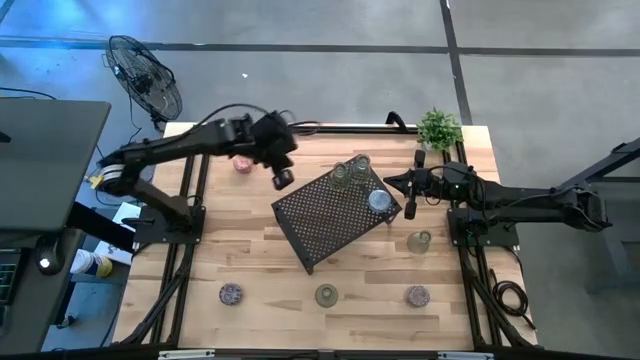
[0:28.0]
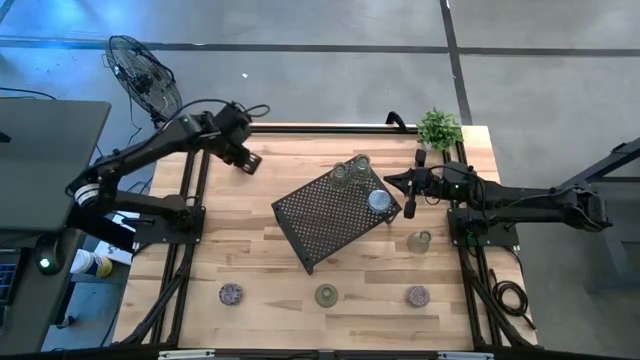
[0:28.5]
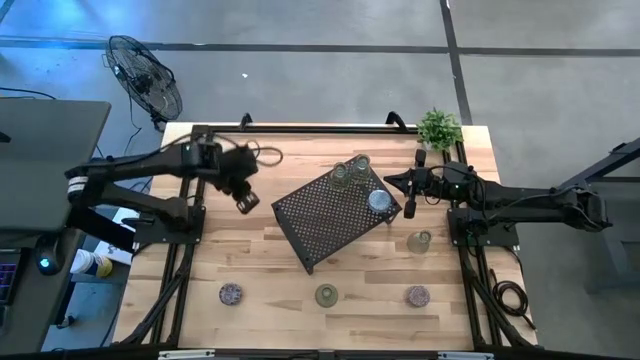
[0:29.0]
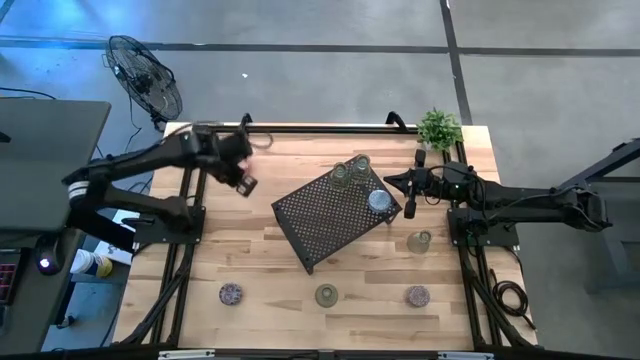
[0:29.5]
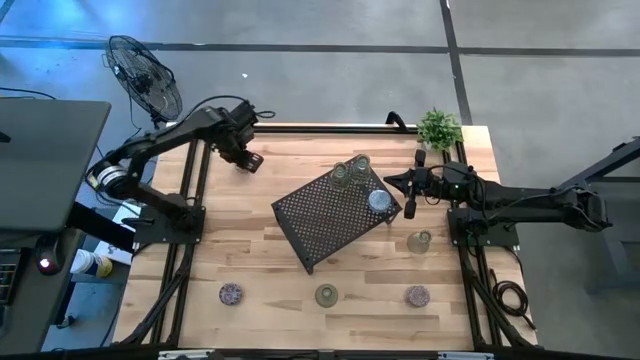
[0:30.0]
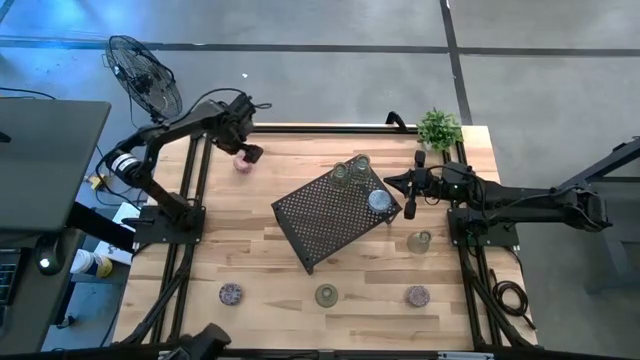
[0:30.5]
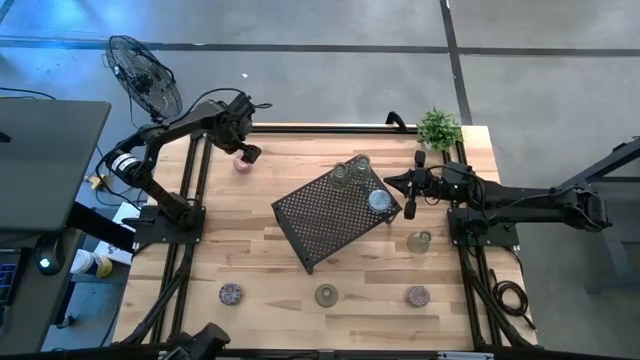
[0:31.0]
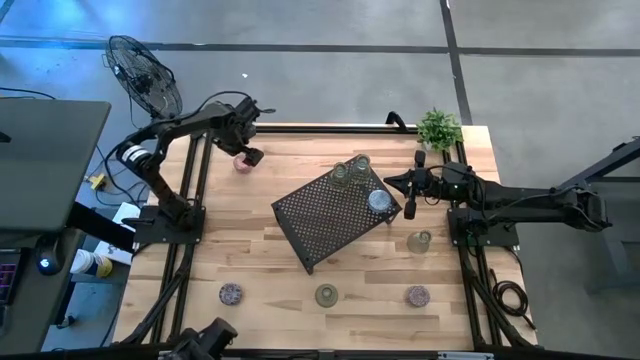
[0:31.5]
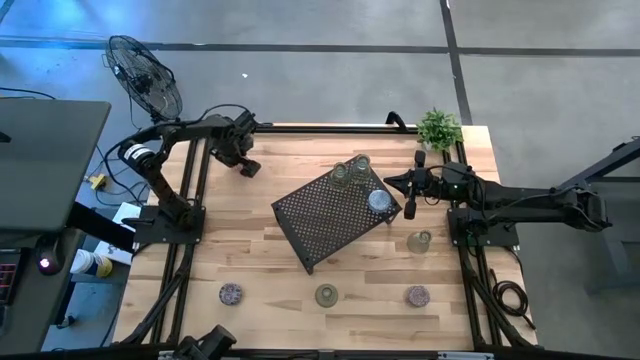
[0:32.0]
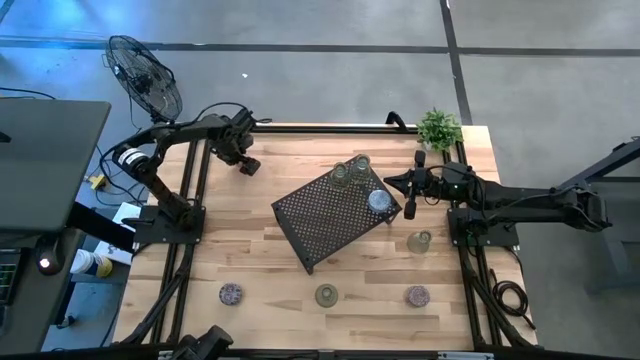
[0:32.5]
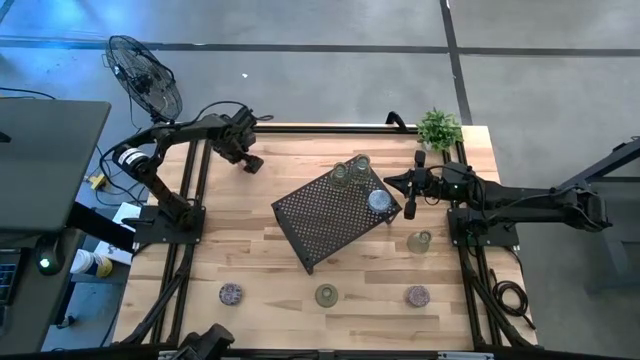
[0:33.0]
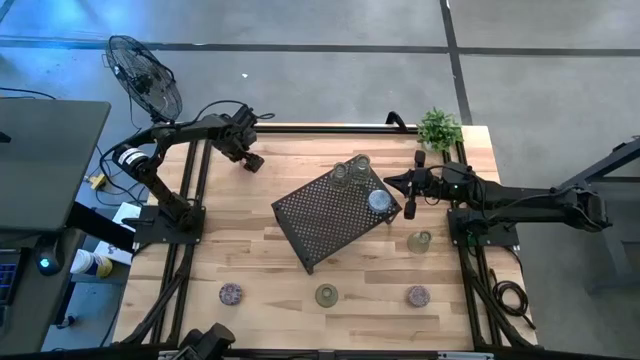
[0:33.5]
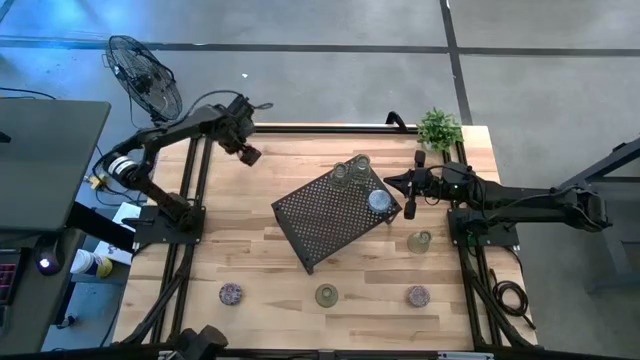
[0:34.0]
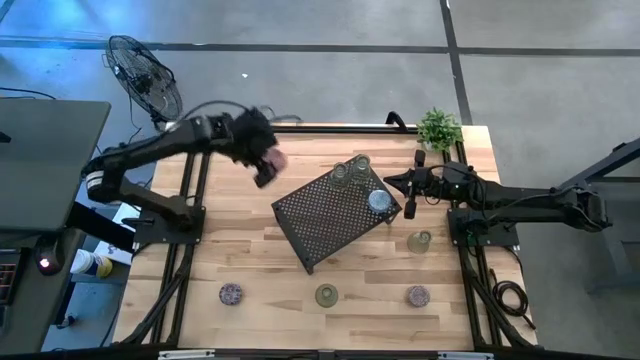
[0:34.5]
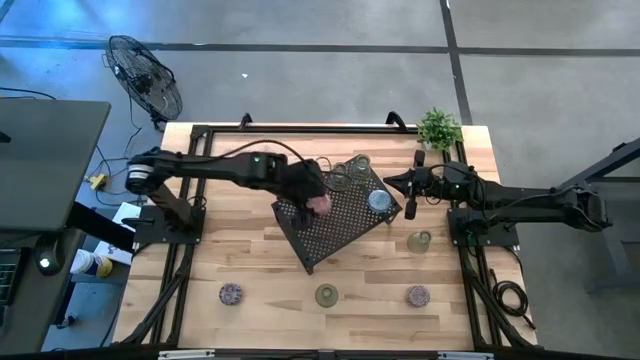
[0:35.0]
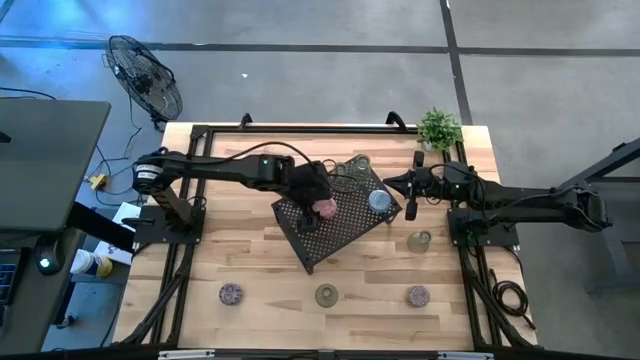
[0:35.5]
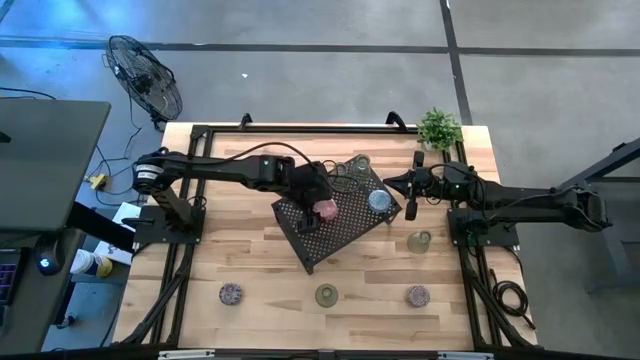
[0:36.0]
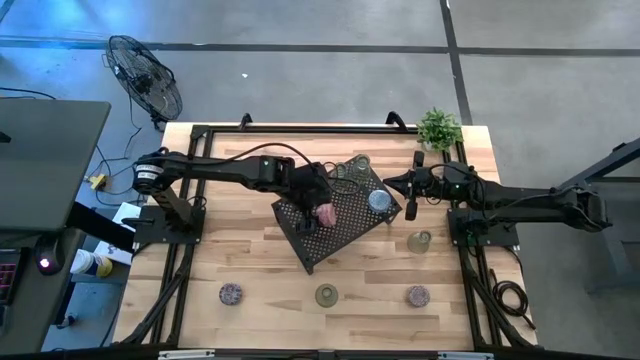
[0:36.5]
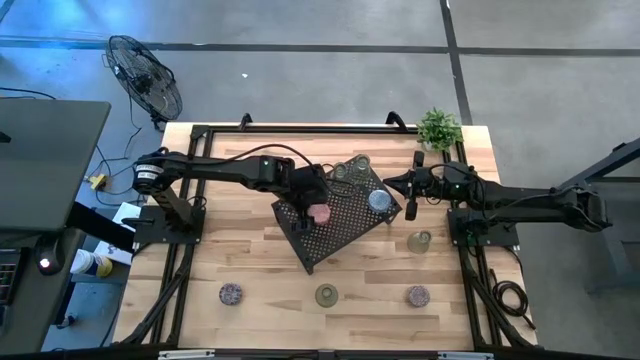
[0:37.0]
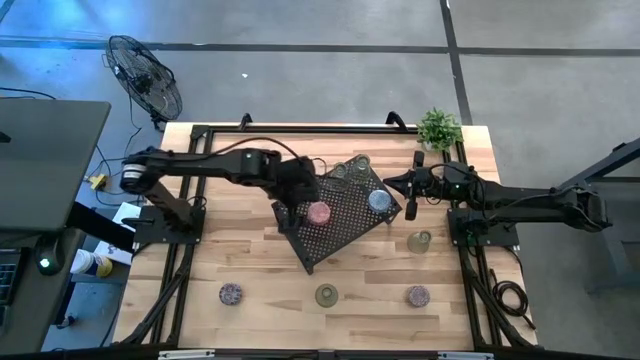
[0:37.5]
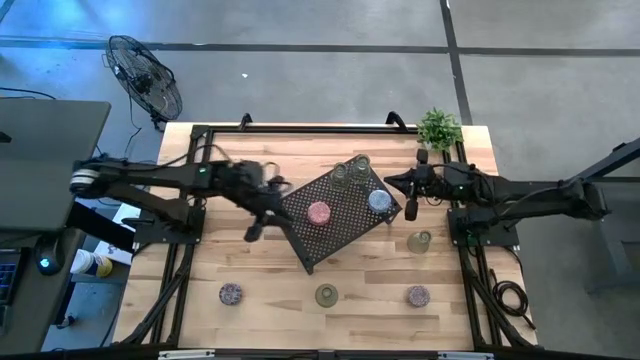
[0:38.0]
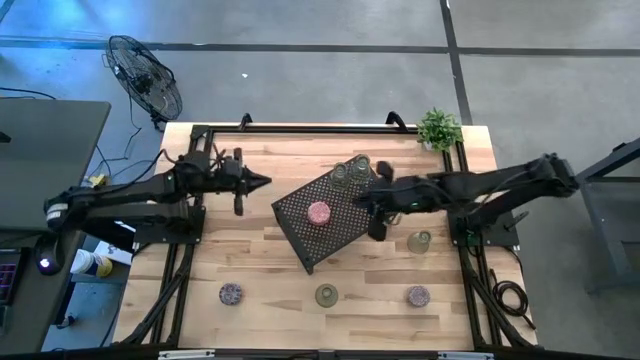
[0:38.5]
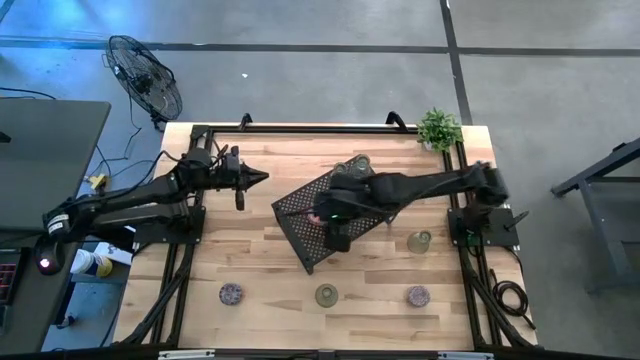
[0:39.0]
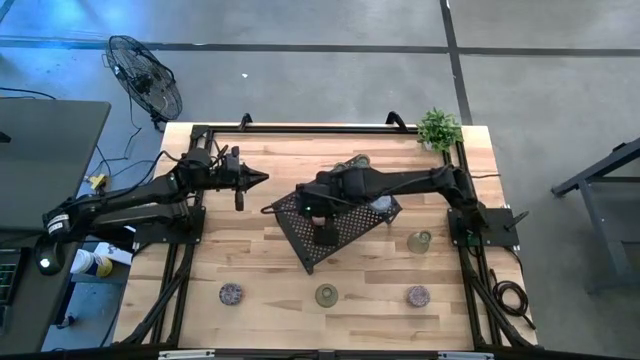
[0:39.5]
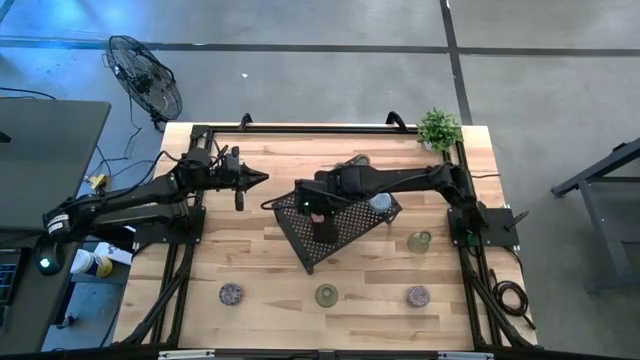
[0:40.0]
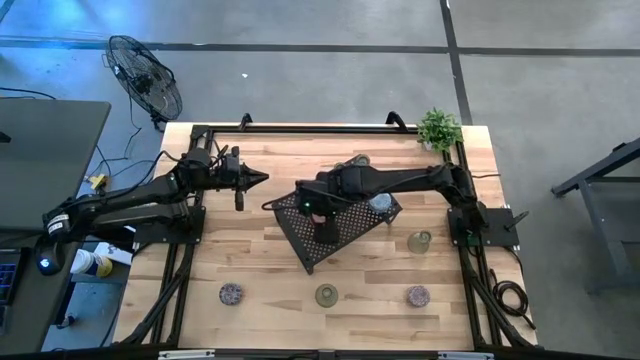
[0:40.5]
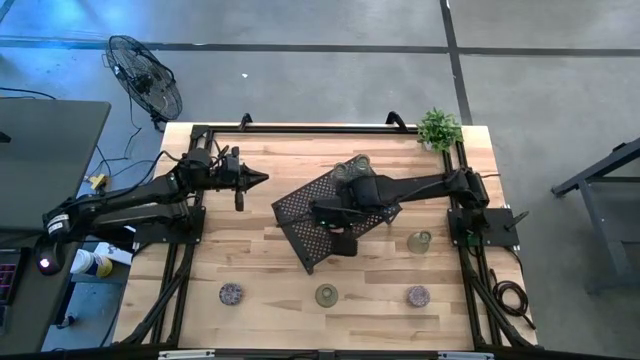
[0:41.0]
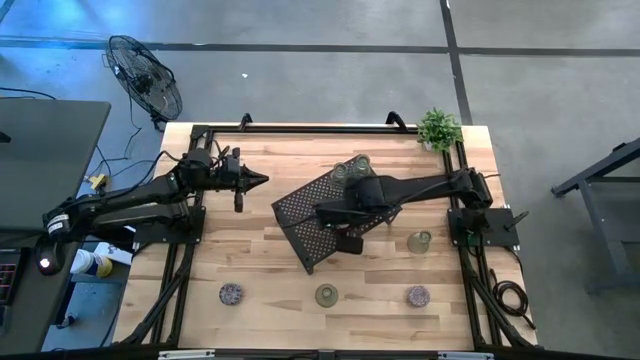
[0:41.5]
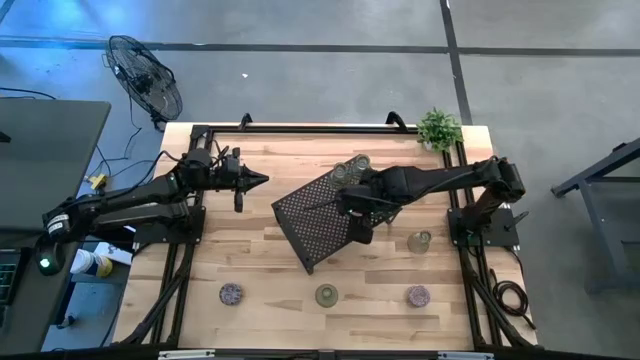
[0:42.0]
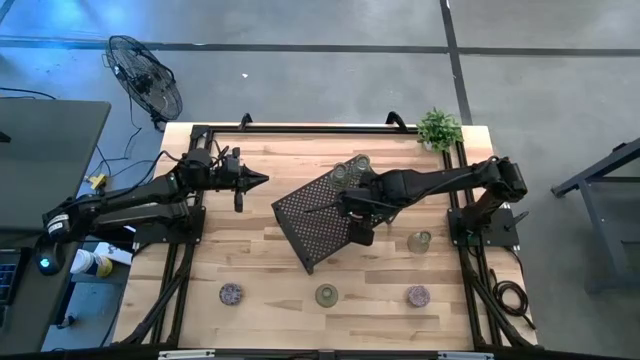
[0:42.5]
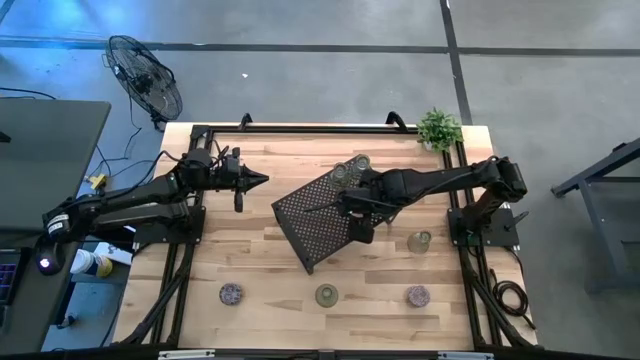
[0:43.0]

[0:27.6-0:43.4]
Task: Pick & Place candle stick holders
Put the pink scented candle on the shelf

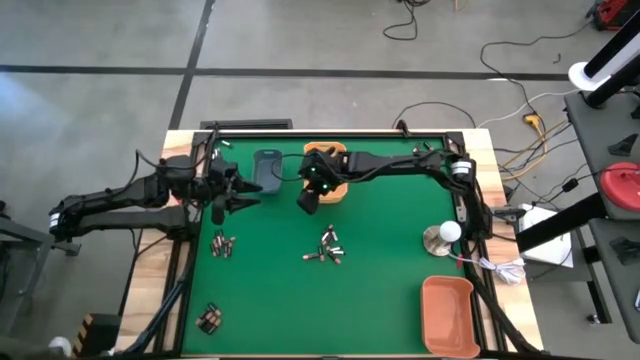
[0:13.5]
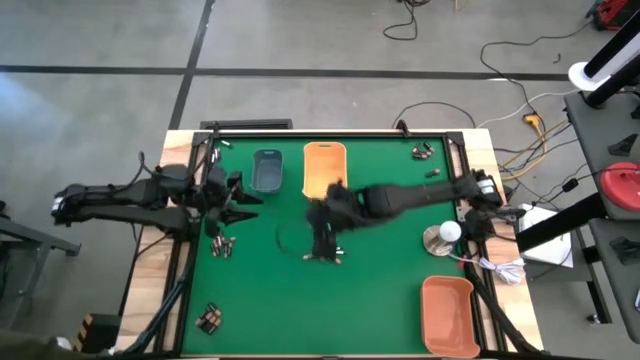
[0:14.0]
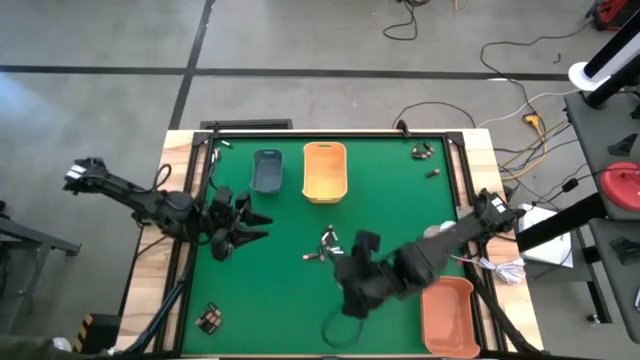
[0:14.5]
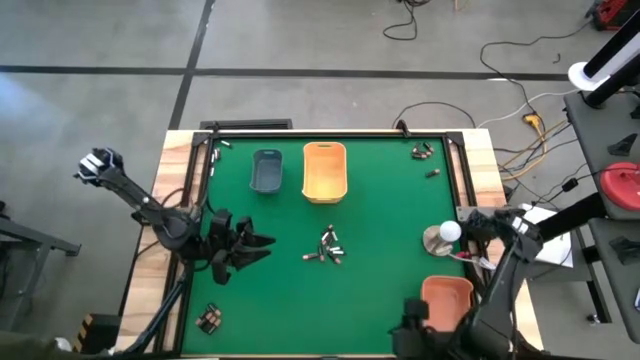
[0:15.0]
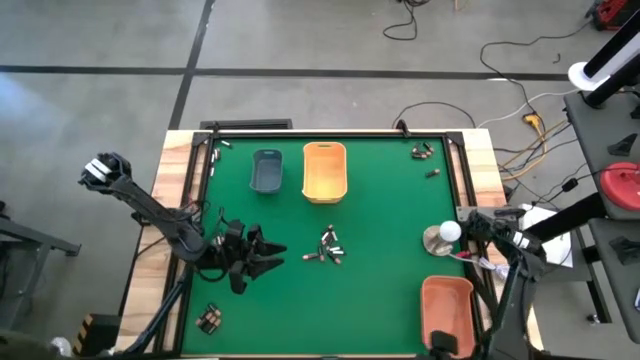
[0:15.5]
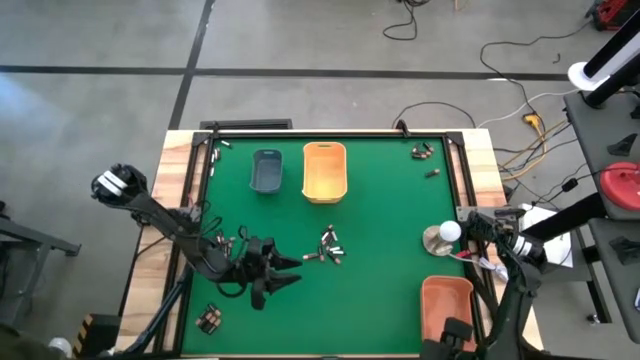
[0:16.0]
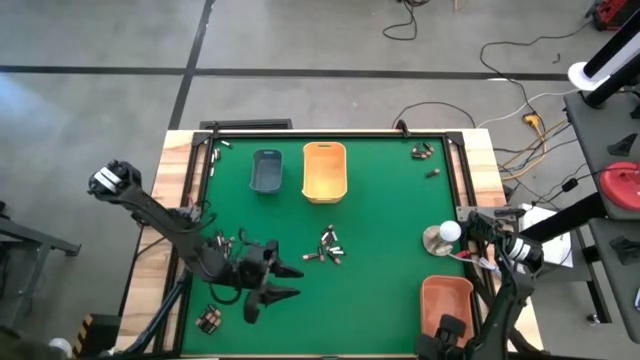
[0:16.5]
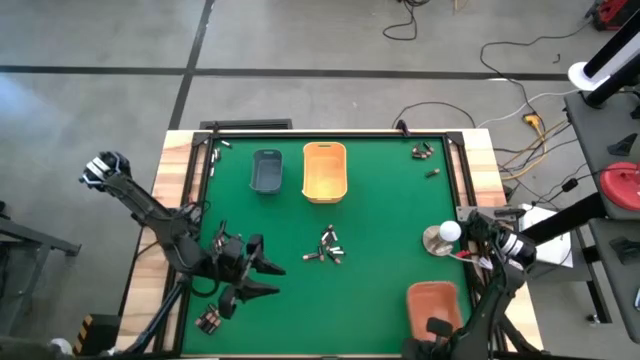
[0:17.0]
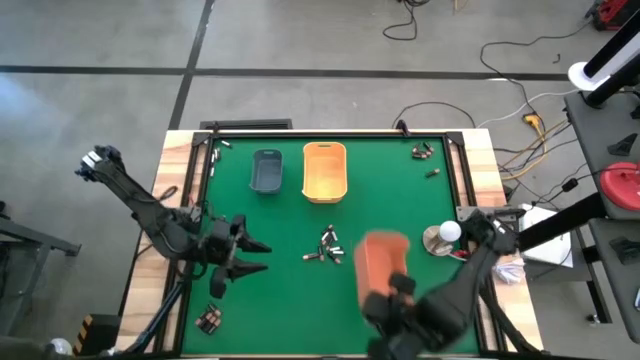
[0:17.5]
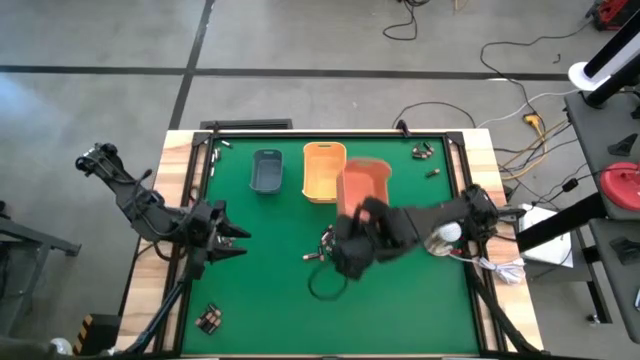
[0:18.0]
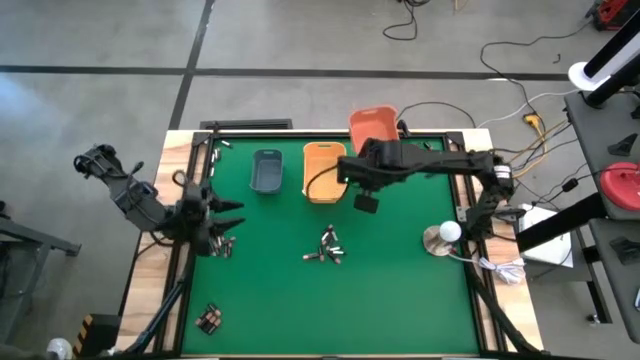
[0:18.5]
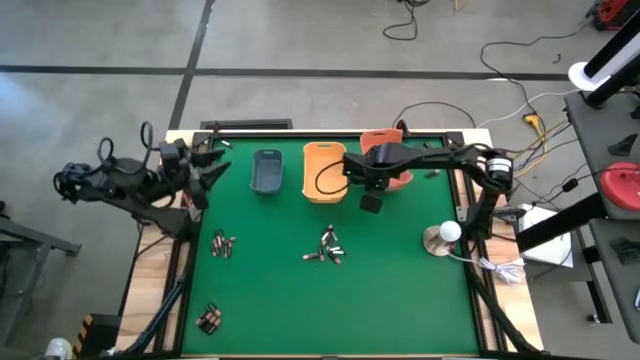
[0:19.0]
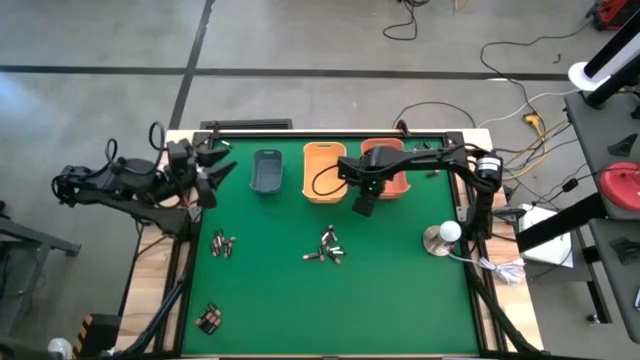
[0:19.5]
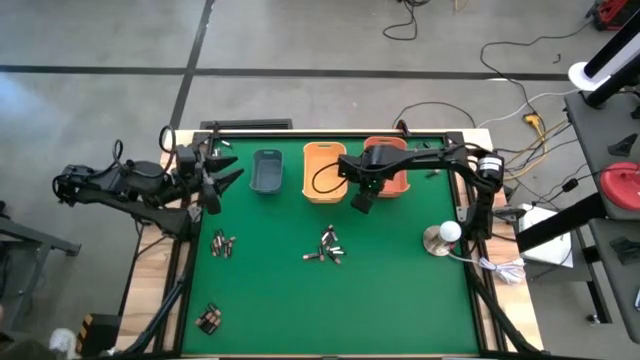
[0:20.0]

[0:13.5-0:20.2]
Task: Sort batteries
Move the orange bin to the top right of the table
